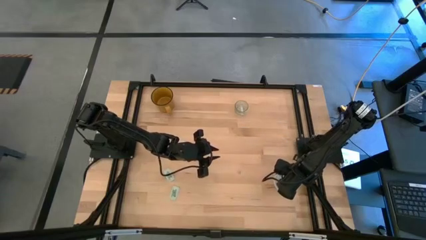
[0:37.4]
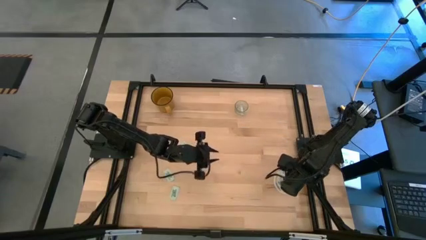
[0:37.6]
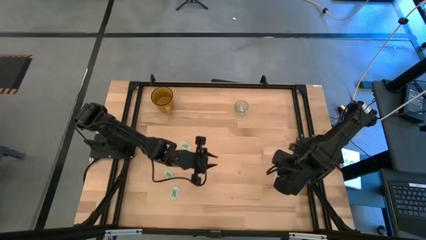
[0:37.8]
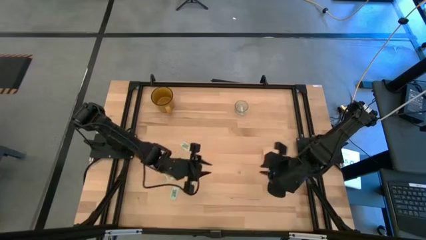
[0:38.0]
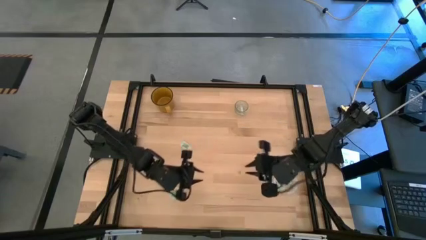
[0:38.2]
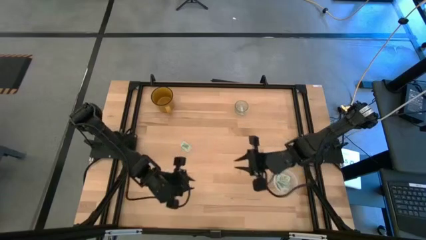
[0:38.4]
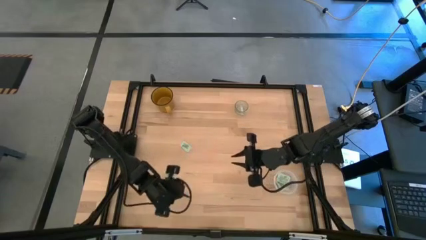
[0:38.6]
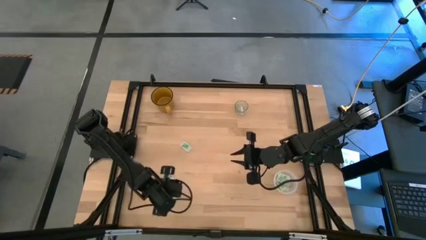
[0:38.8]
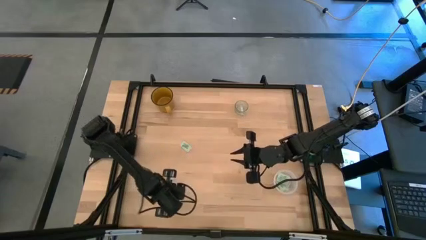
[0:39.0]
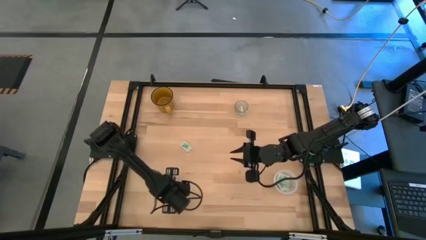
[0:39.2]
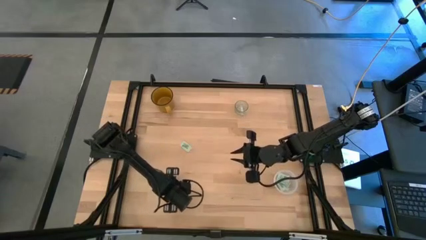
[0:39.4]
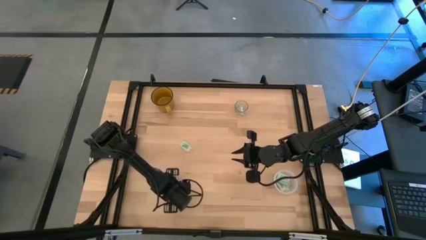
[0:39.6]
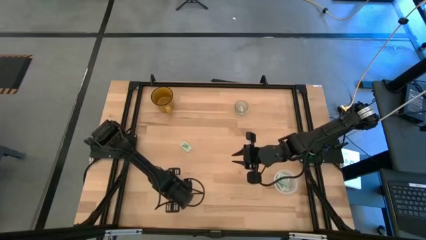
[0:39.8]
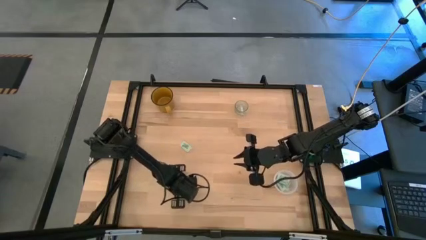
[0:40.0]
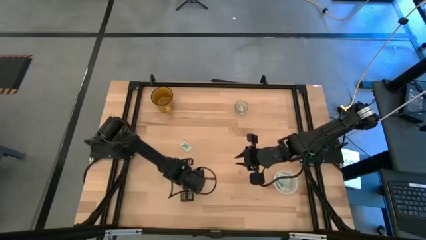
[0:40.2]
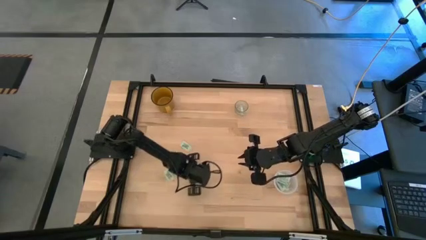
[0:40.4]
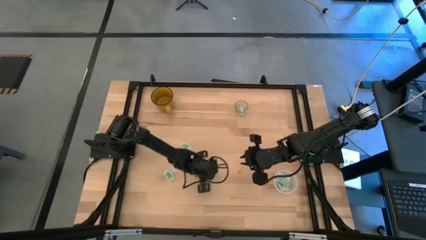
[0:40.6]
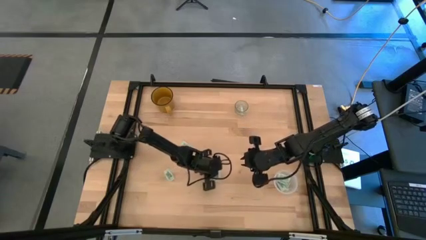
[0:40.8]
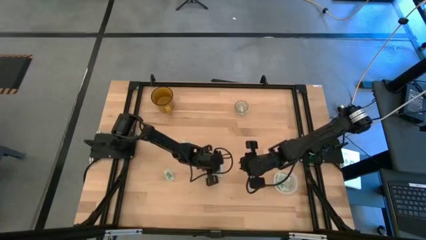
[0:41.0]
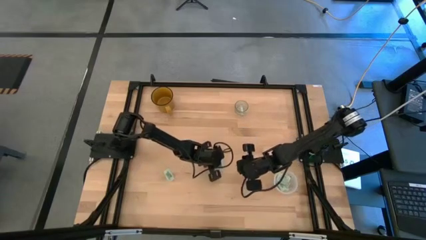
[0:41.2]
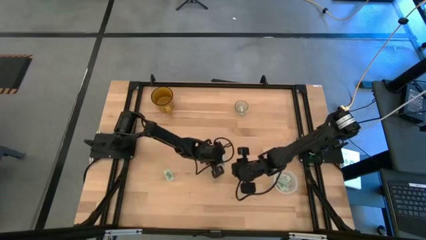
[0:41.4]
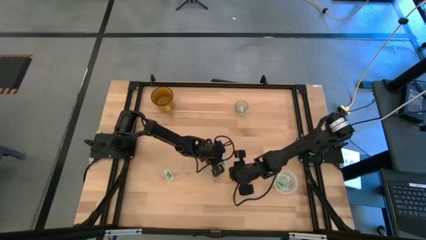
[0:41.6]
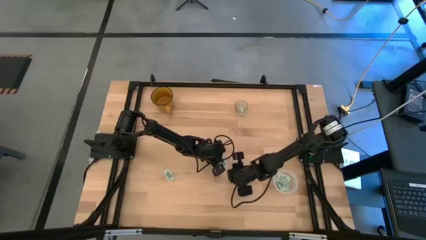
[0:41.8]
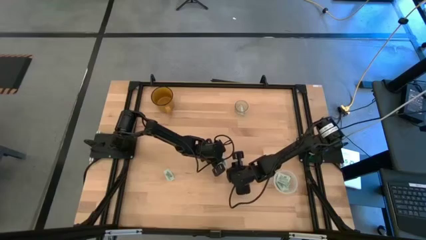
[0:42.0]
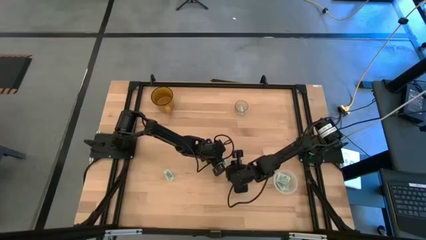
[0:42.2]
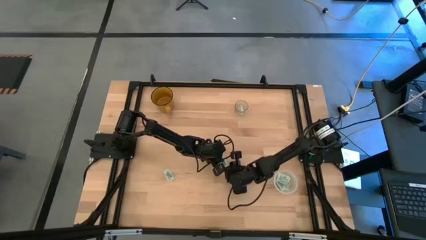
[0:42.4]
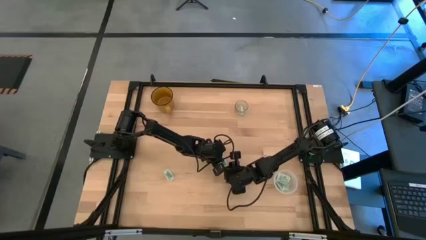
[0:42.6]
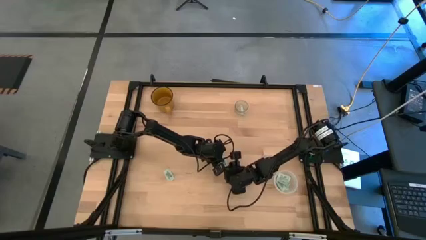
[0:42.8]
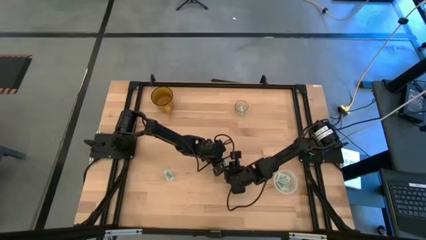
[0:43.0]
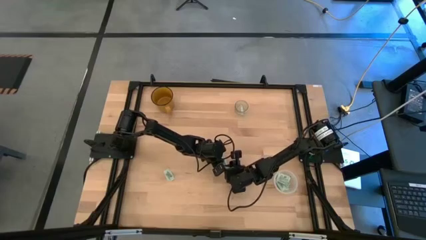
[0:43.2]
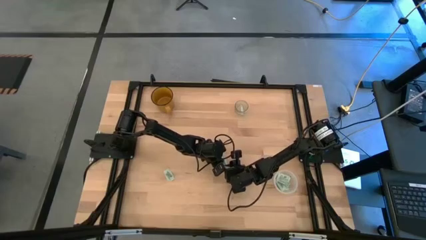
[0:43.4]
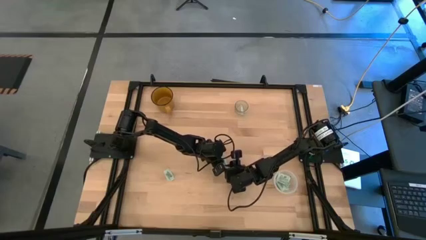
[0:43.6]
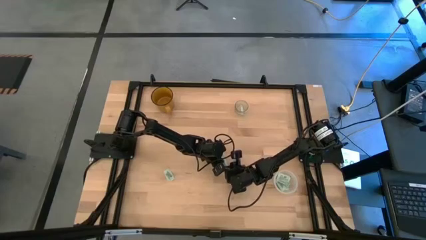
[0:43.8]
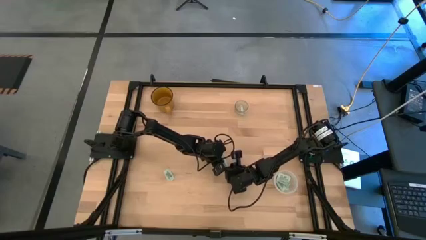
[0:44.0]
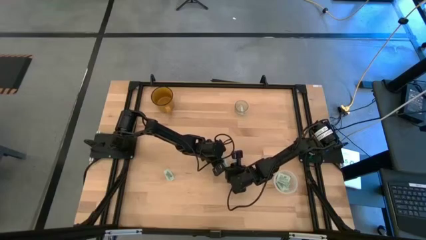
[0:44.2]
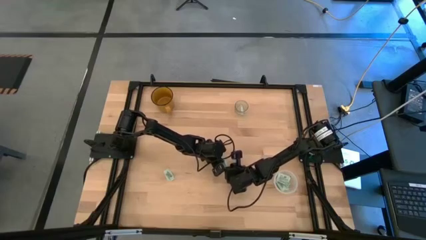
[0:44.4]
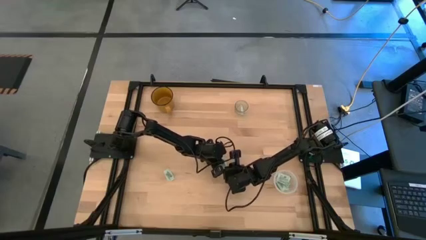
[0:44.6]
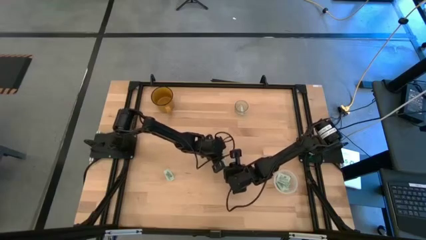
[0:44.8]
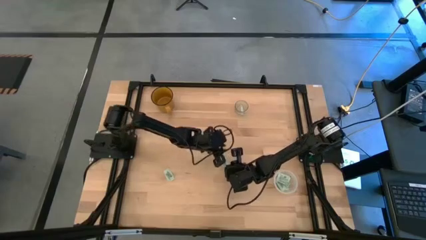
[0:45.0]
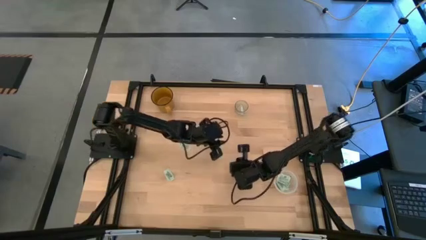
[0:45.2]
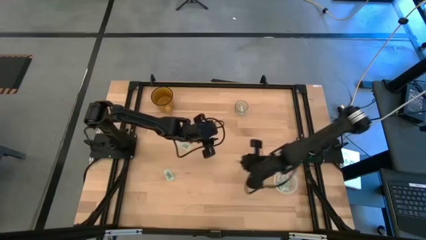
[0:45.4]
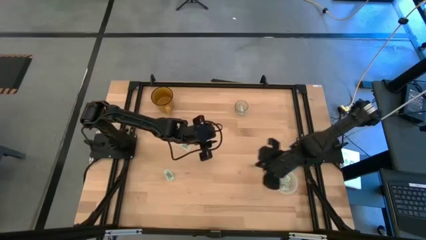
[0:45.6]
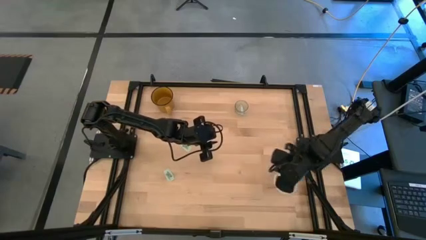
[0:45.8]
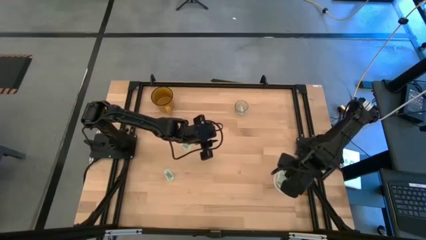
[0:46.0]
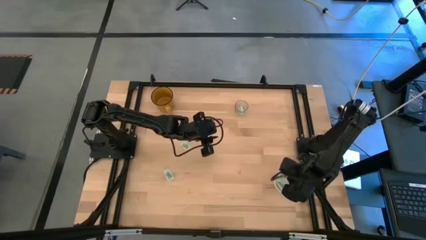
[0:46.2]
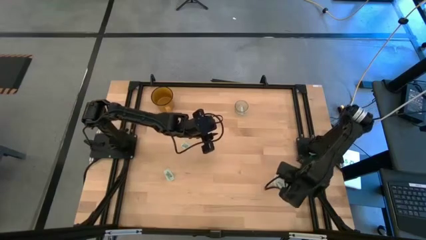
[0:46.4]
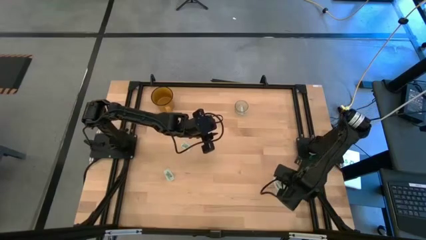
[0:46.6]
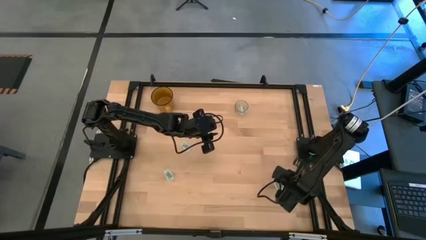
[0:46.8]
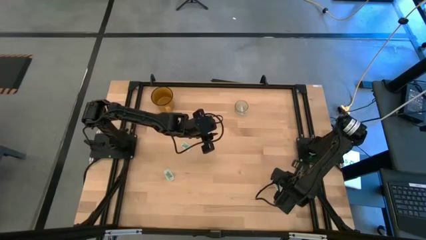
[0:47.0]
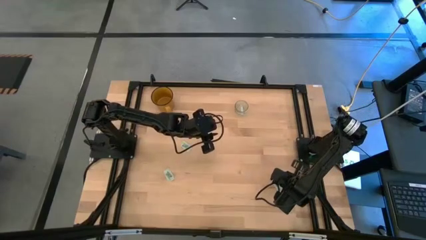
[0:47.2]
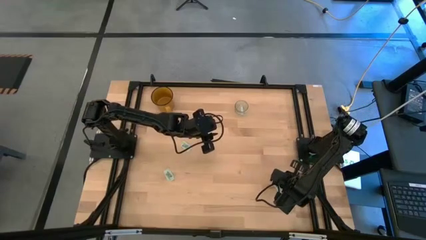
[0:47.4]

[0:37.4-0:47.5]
Task: Pick and place Stevia / Truvia into bins
Put the stevia packet into the transparent container

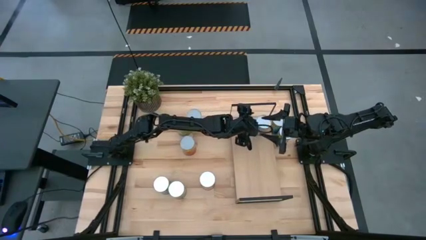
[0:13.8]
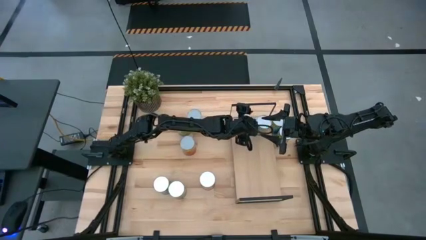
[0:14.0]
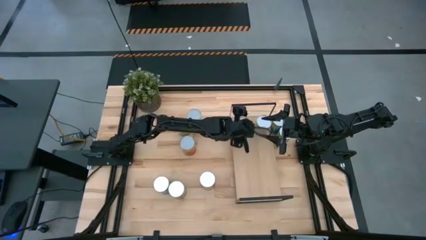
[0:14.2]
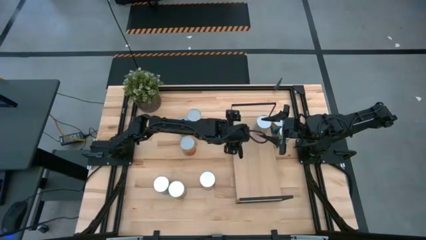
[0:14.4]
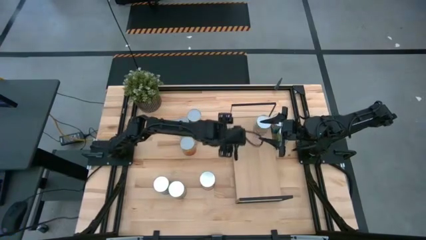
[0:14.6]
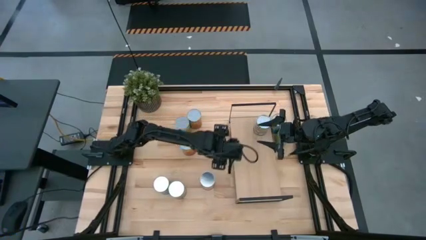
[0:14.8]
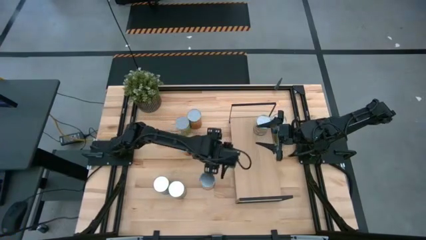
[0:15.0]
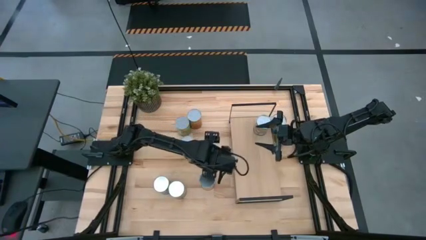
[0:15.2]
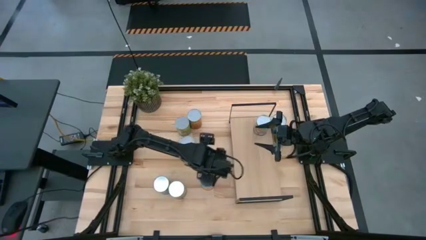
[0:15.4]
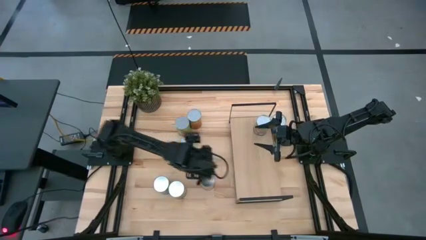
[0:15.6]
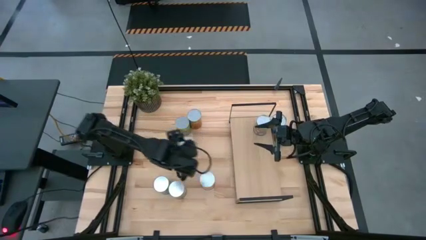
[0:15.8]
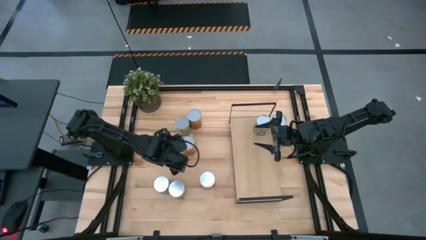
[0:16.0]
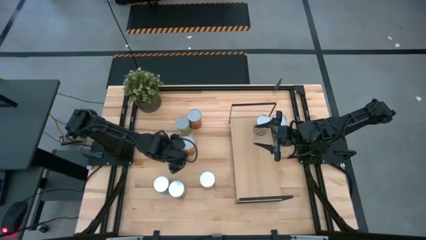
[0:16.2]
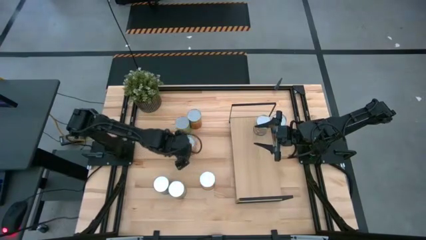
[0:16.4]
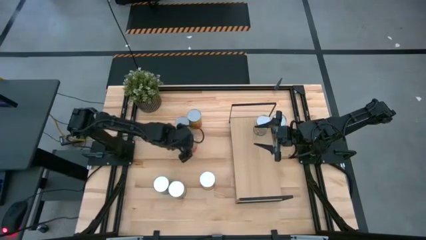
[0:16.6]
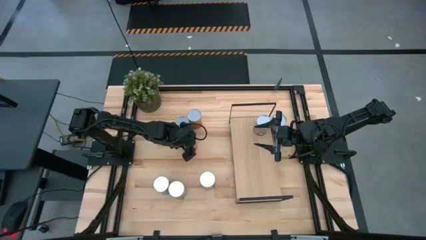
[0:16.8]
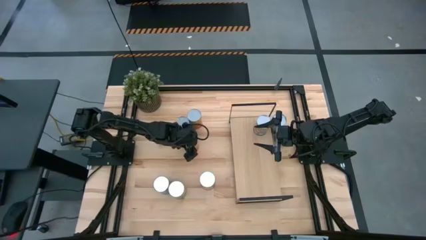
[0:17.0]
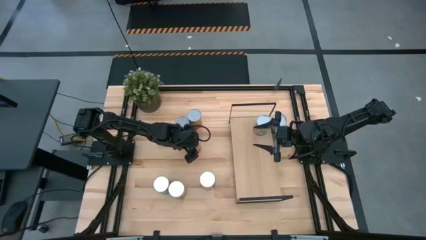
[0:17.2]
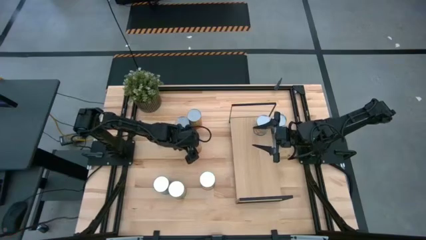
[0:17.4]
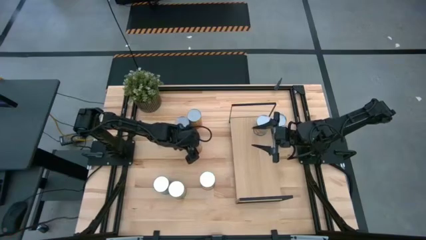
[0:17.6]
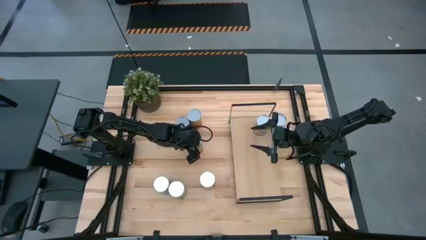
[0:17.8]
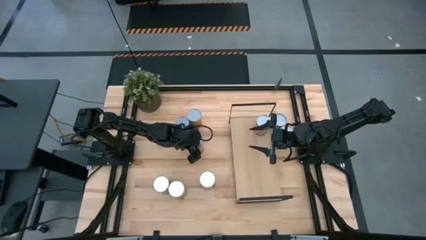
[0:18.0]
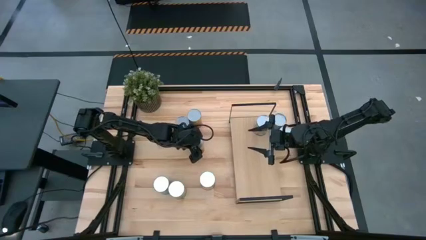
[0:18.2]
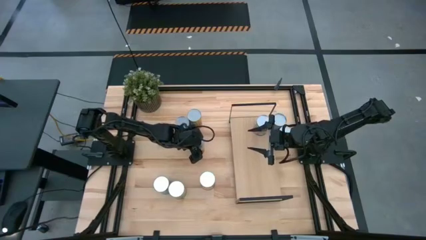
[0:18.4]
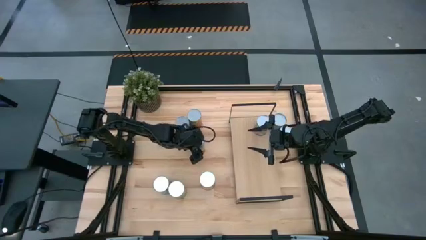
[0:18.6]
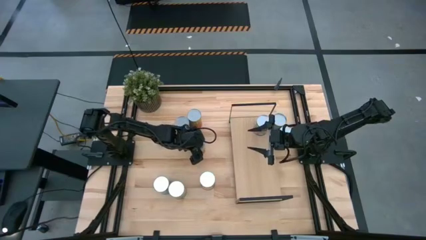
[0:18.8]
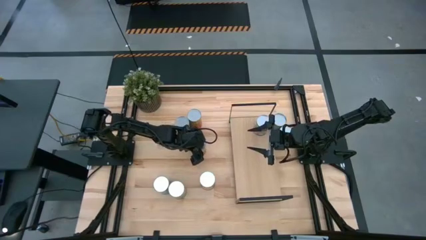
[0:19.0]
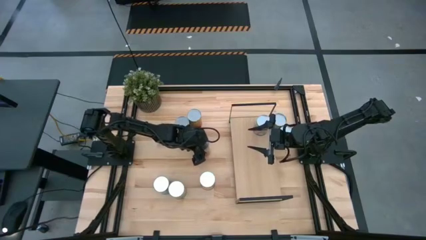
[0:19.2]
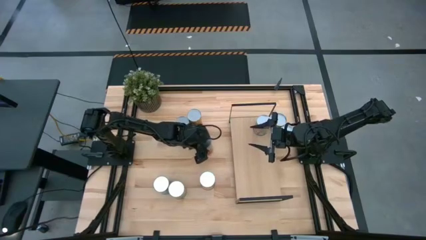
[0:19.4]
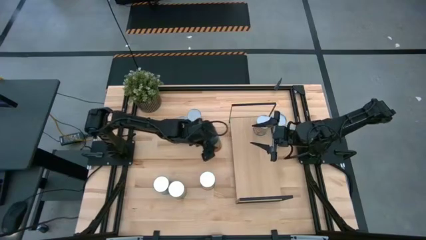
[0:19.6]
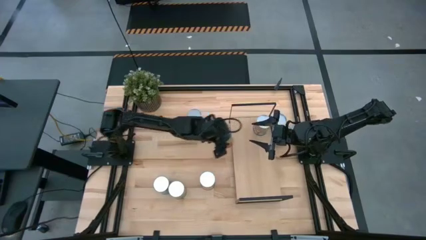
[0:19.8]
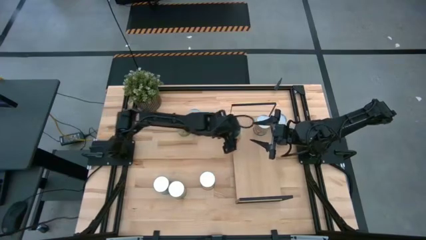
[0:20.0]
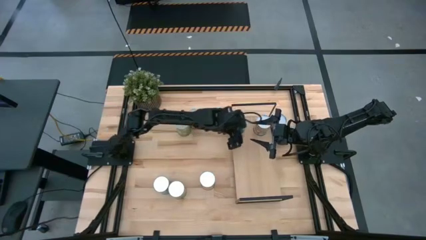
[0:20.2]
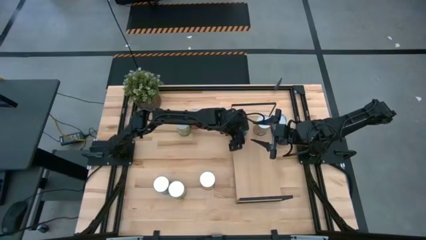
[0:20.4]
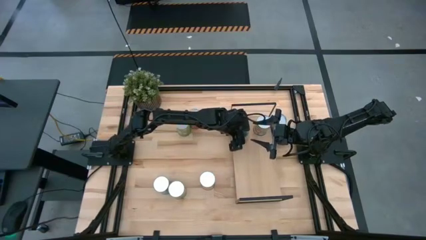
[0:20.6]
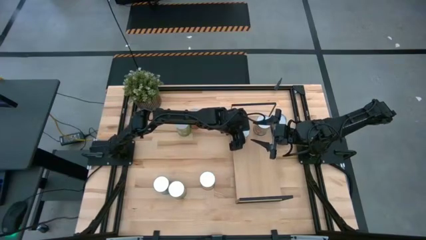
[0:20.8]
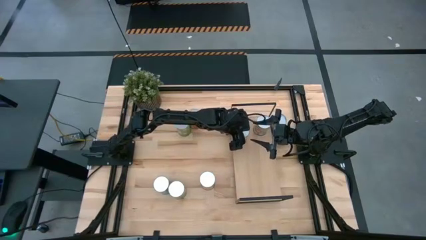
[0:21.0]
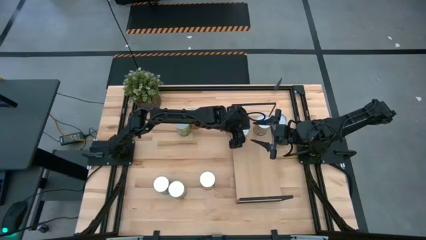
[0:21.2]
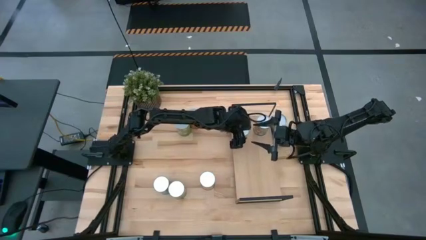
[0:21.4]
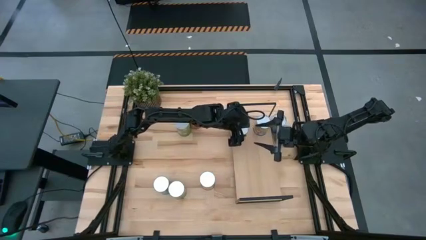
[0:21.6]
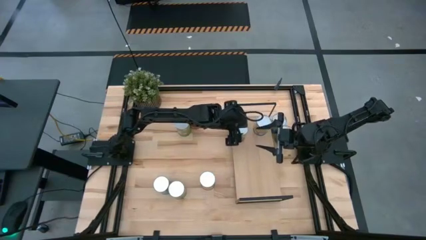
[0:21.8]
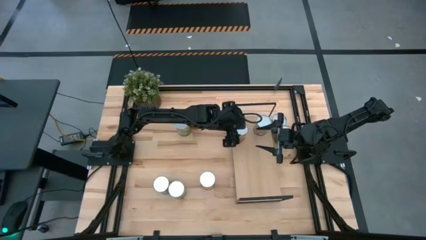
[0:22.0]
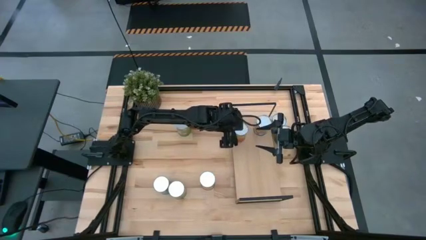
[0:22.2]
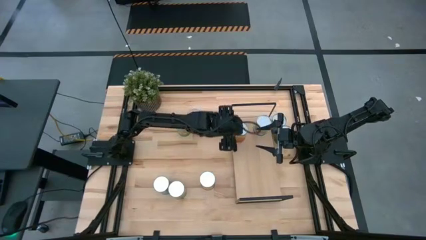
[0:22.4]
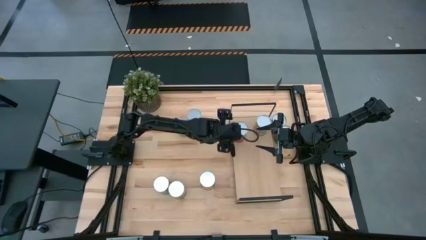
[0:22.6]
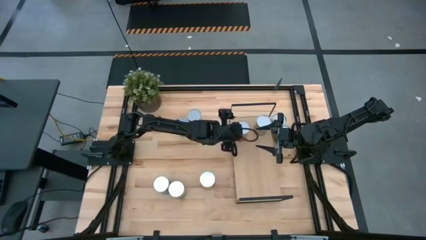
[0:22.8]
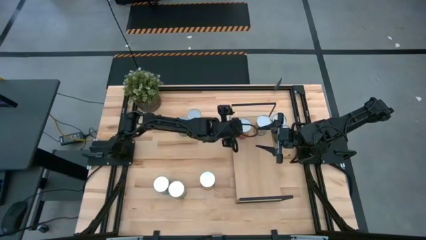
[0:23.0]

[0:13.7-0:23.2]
Task: Pick and place cans onto a shelf
Put the canned pineapple on the shelf
